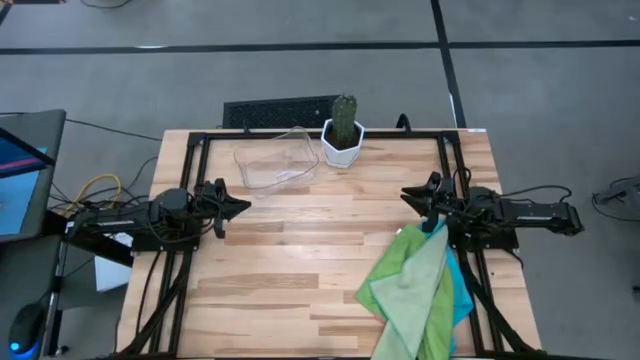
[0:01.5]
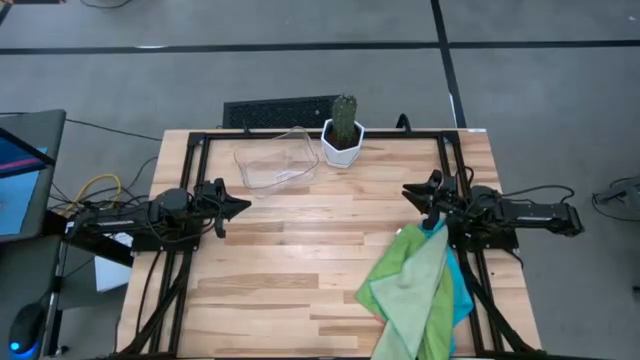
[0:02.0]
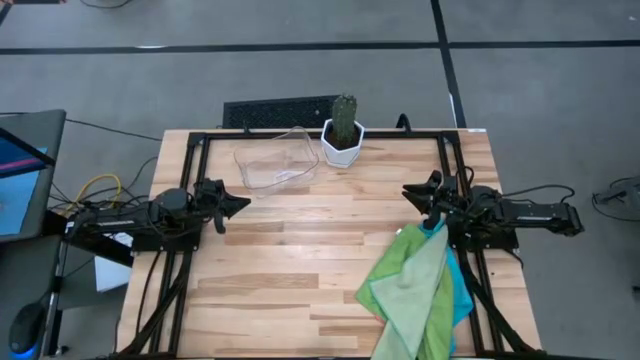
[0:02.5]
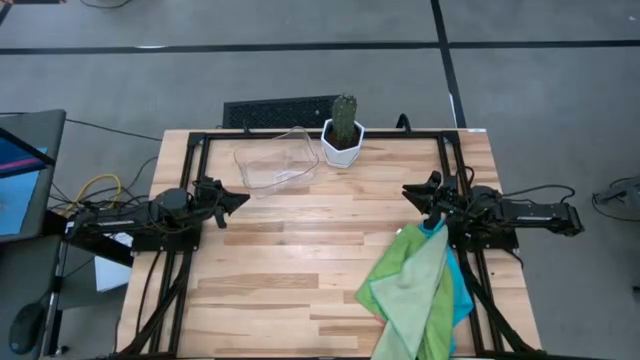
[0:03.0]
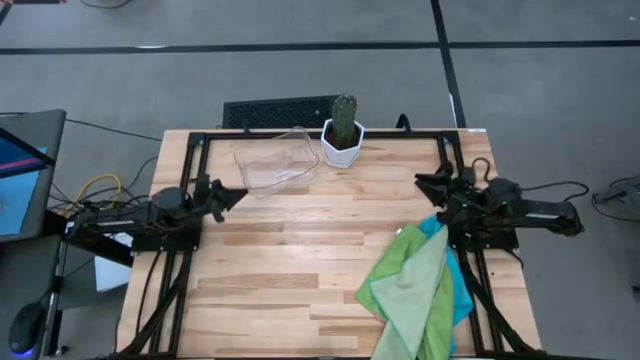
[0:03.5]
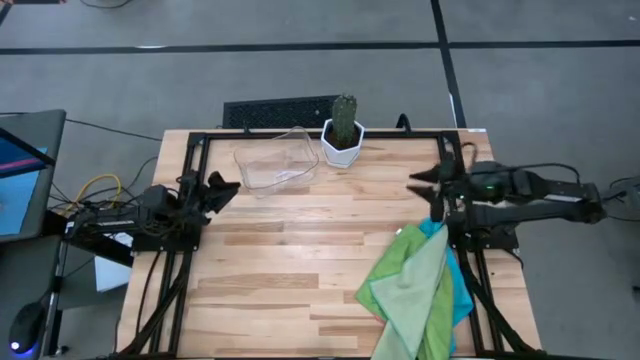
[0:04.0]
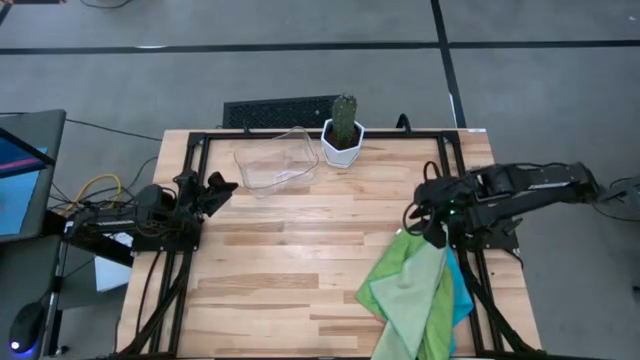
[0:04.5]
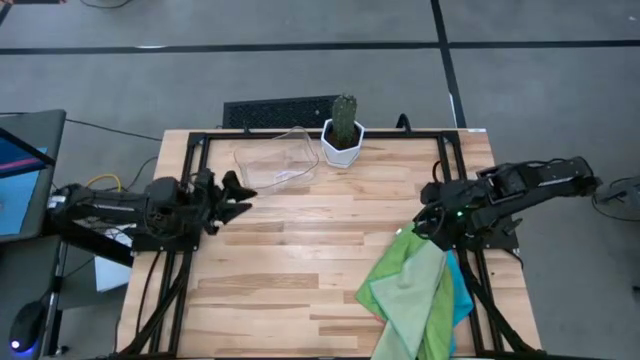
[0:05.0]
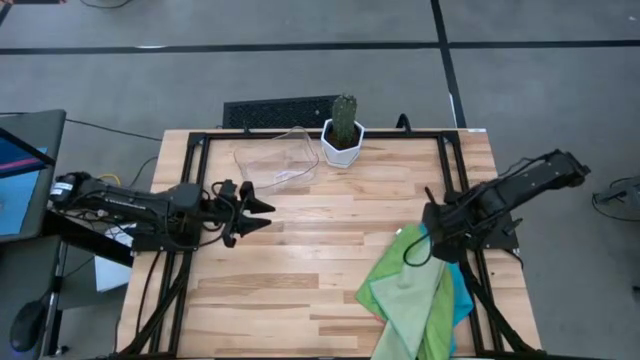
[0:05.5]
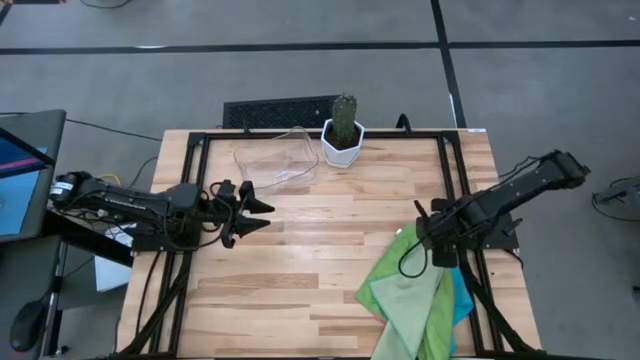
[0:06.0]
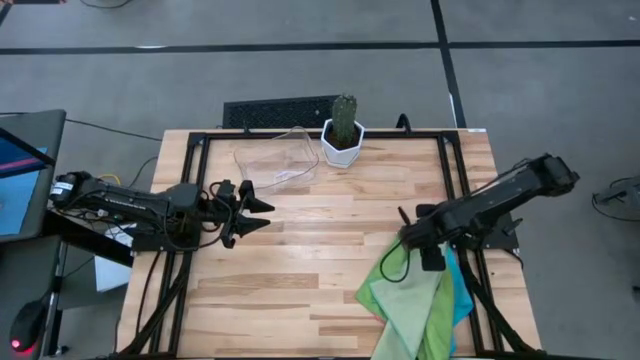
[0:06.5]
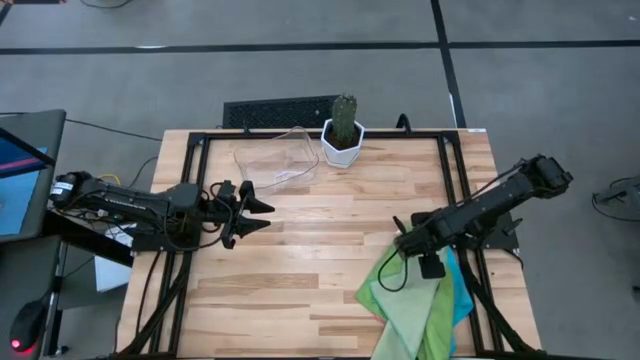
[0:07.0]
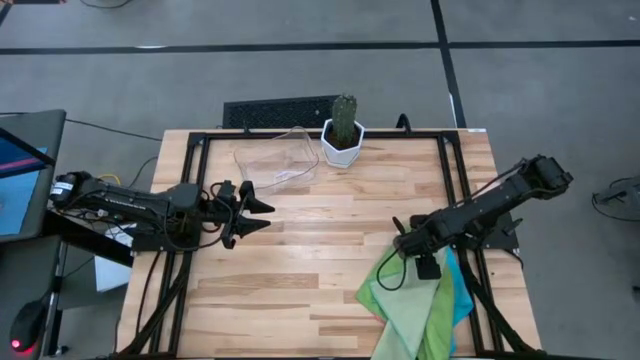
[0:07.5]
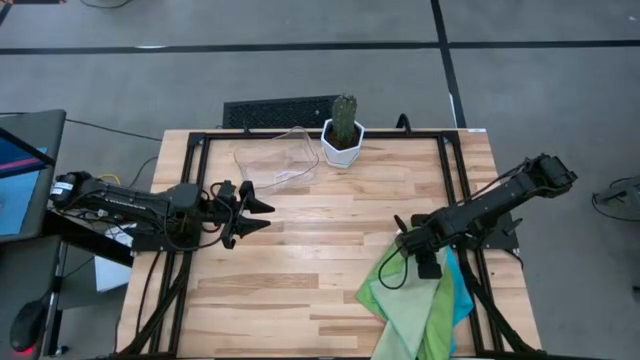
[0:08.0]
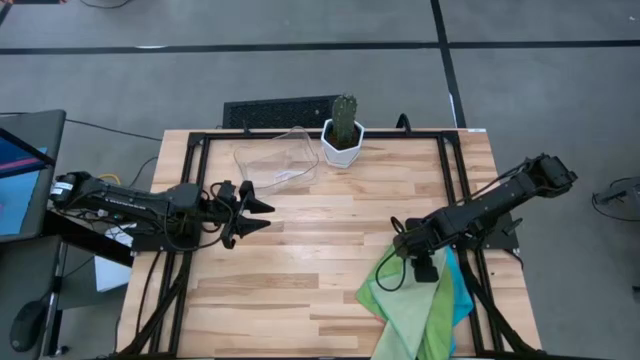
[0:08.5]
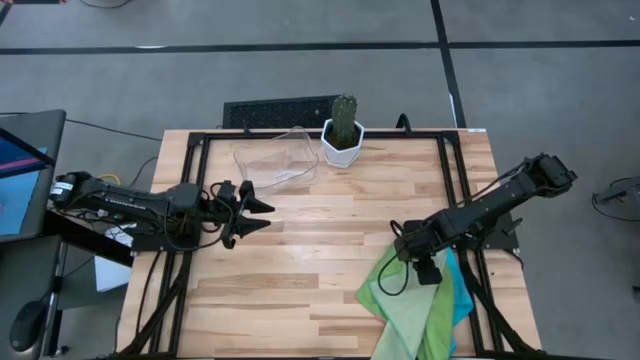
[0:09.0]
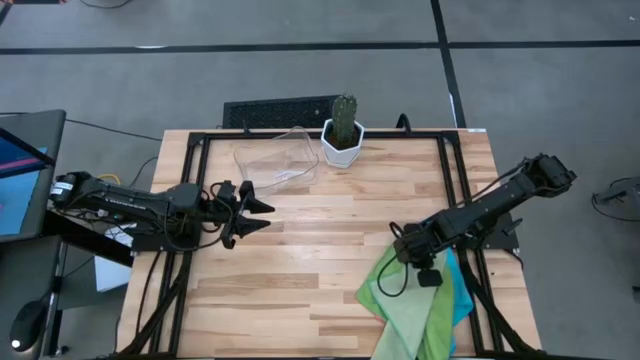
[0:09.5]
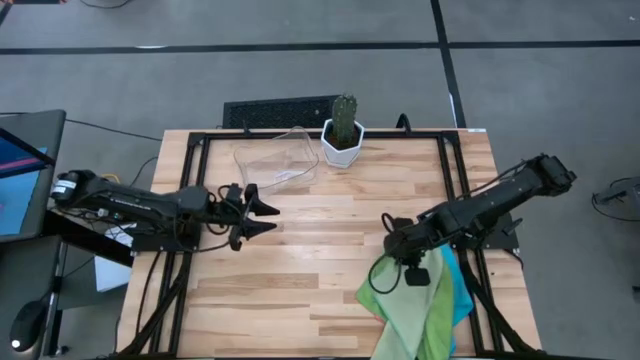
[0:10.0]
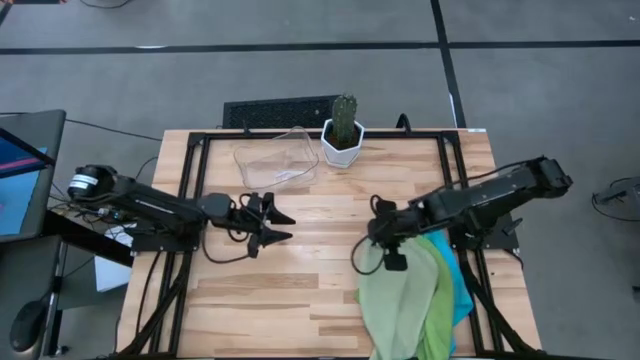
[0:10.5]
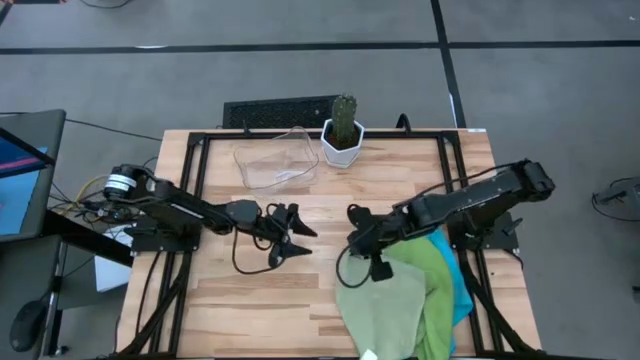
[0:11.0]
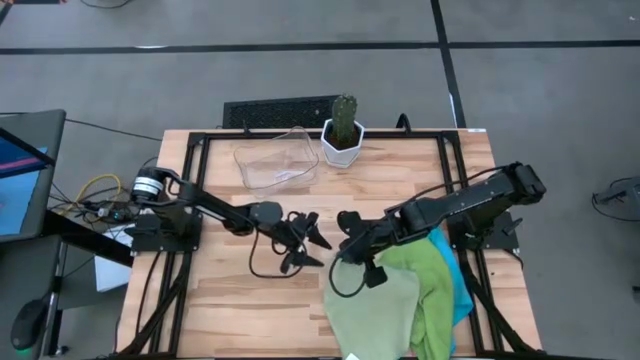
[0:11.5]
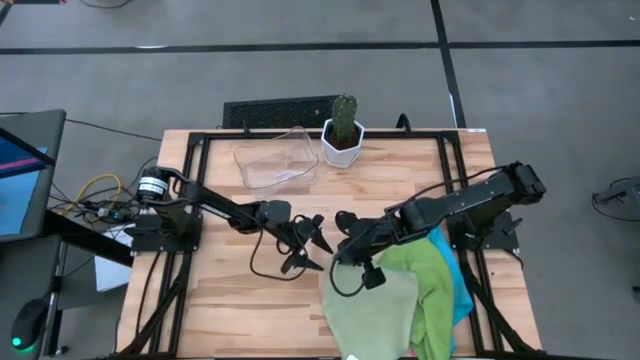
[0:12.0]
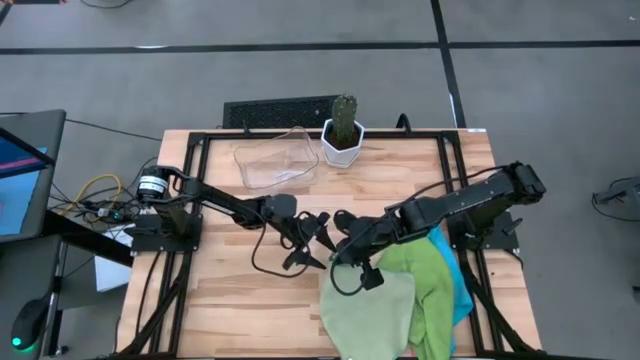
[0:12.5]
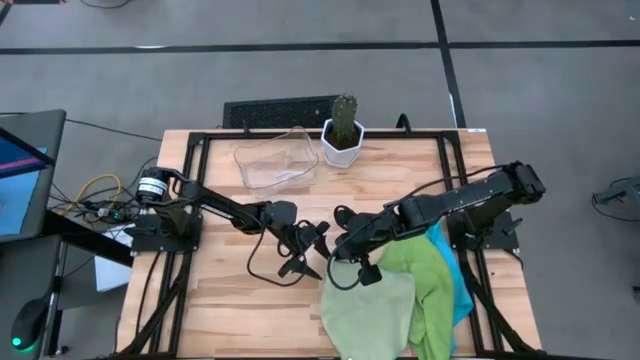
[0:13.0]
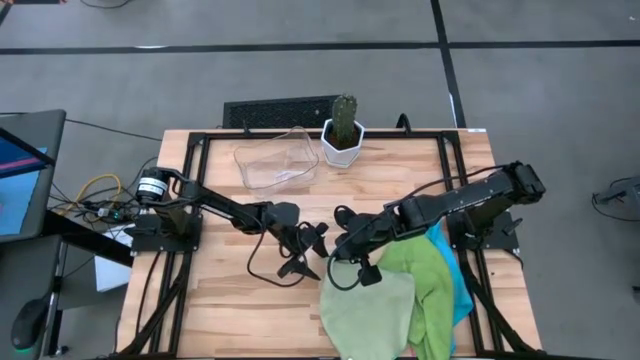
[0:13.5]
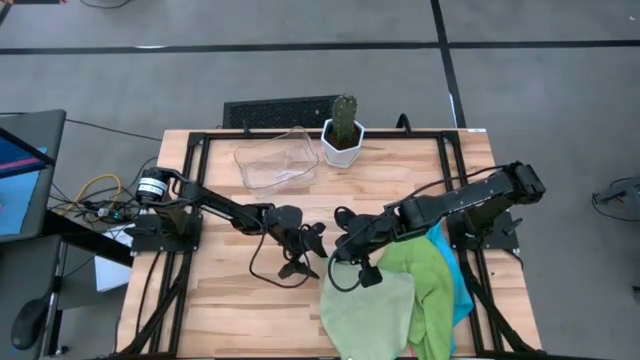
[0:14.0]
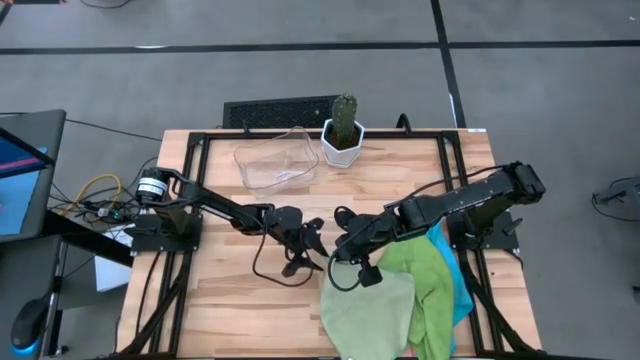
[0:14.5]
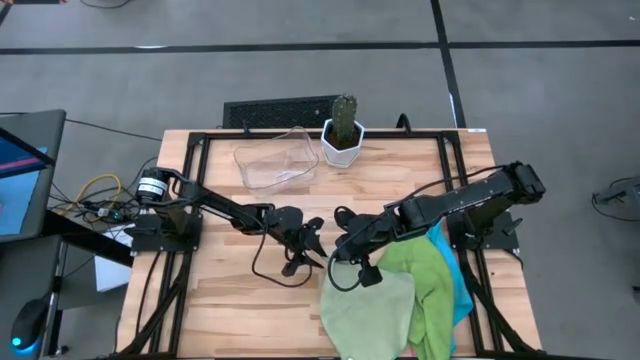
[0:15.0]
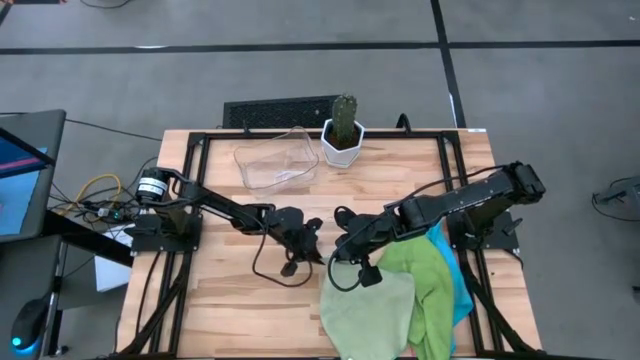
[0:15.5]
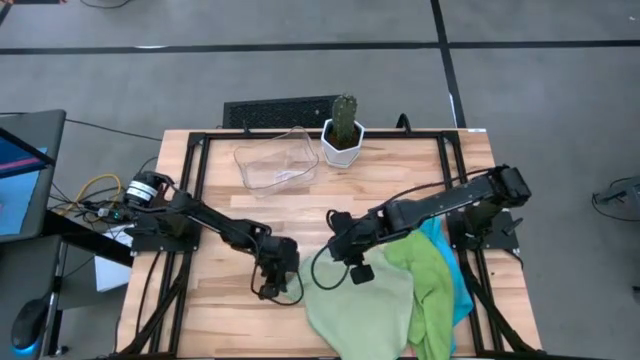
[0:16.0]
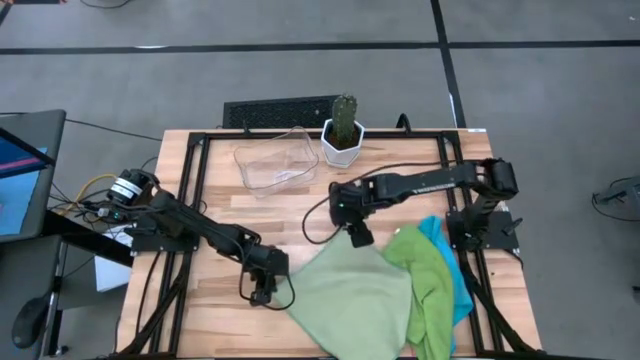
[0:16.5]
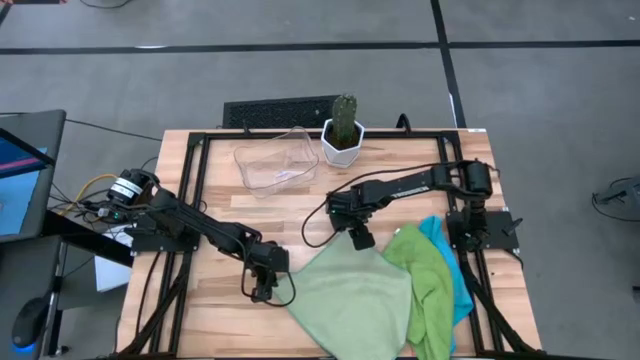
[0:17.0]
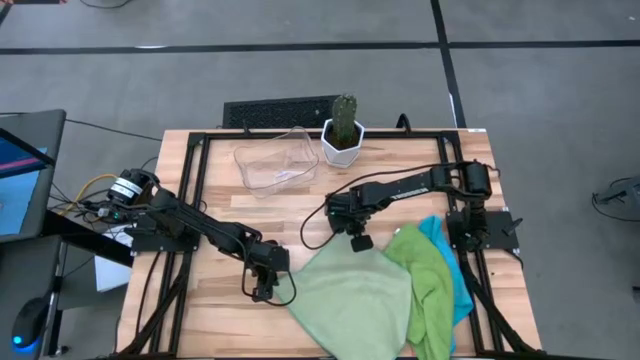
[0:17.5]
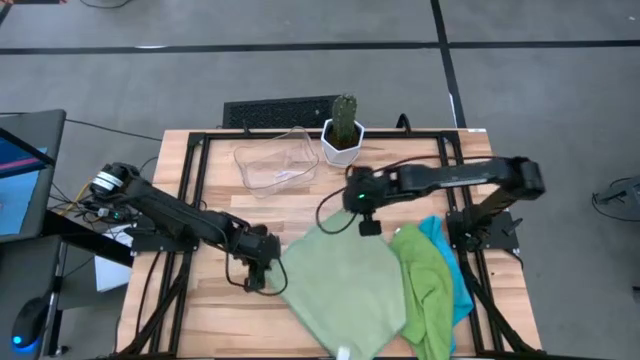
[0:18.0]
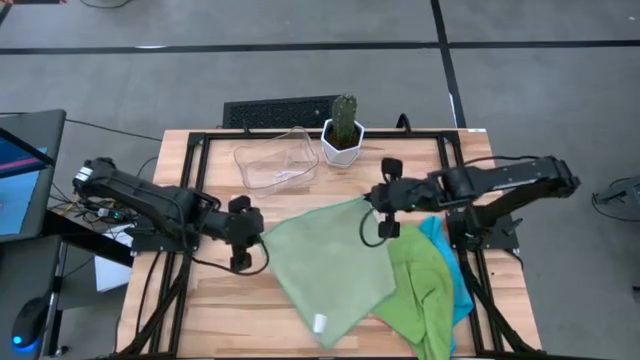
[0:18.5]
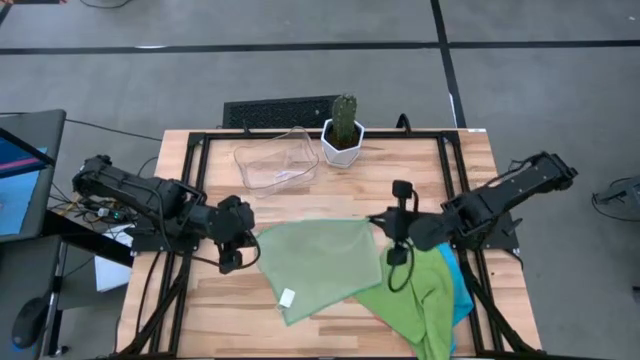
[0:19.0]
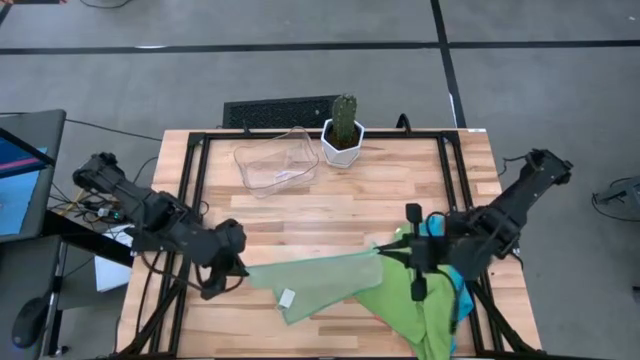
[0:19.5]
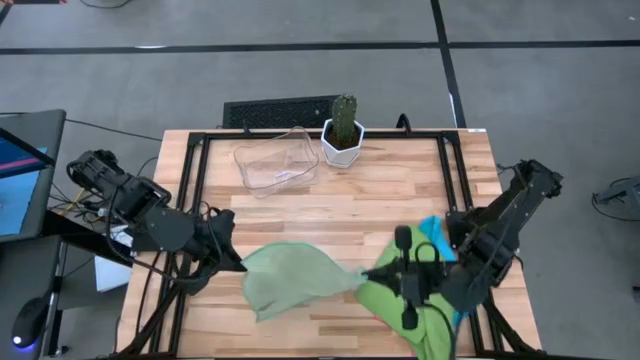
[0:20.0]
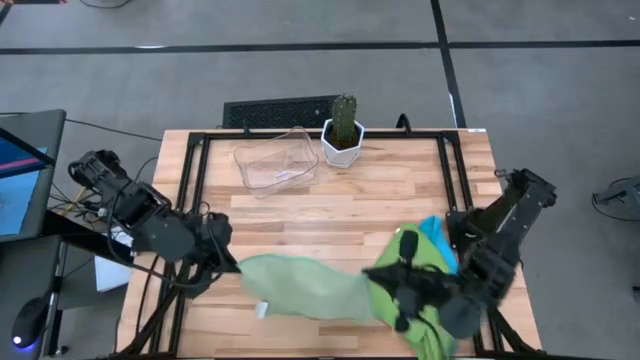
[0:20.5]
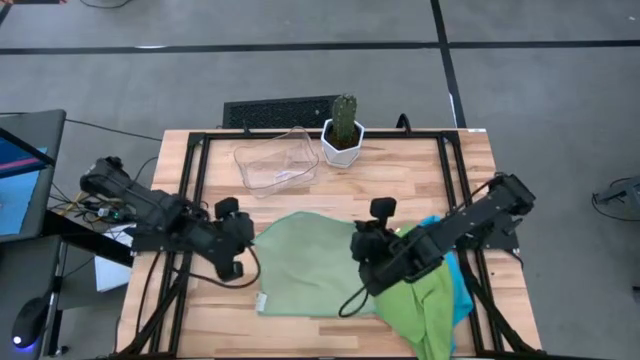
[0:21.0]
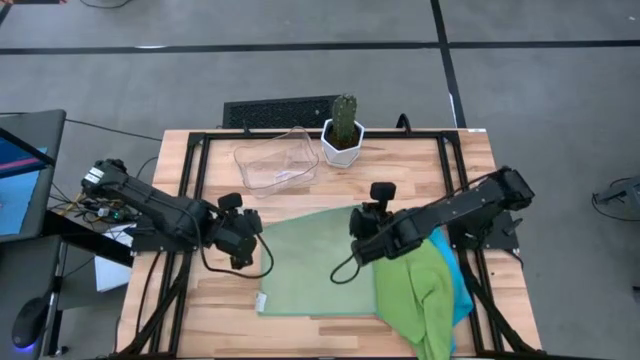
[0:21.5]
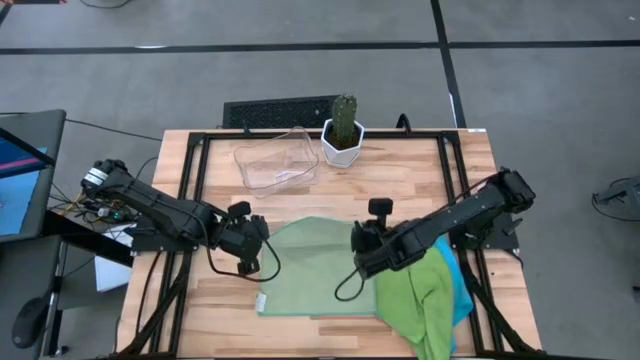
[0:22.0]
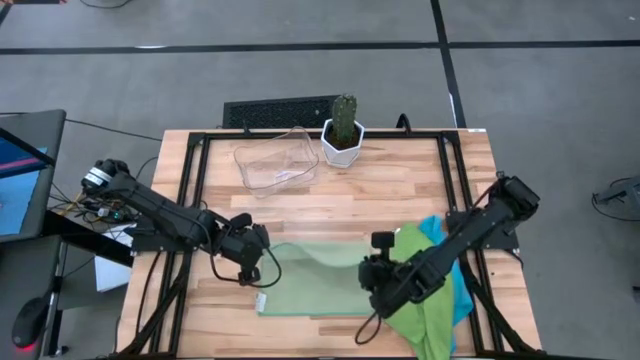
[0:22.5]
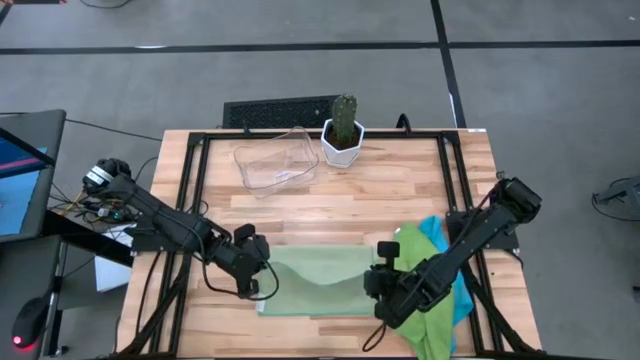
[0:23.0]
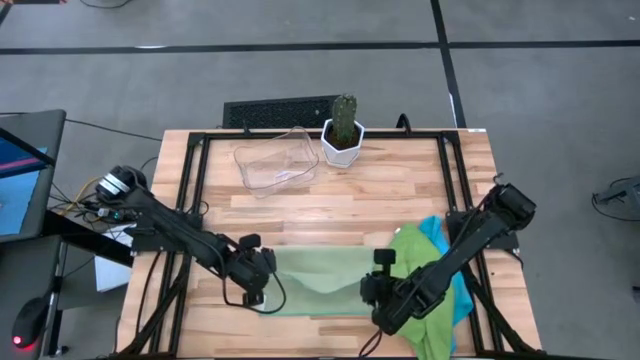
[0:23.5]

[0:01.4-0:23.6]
Task: Fold microfiber towels
Fold the light green microfiber towel
